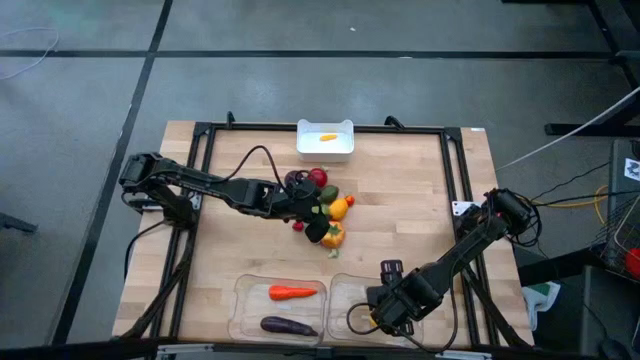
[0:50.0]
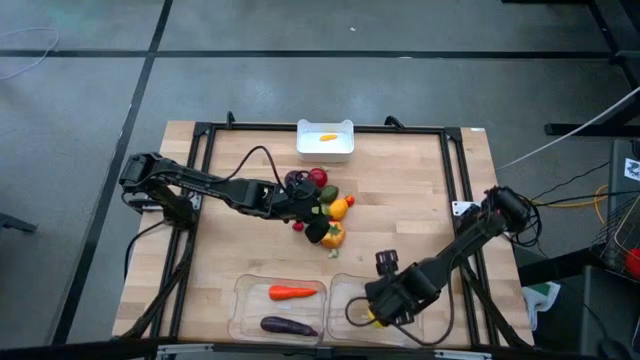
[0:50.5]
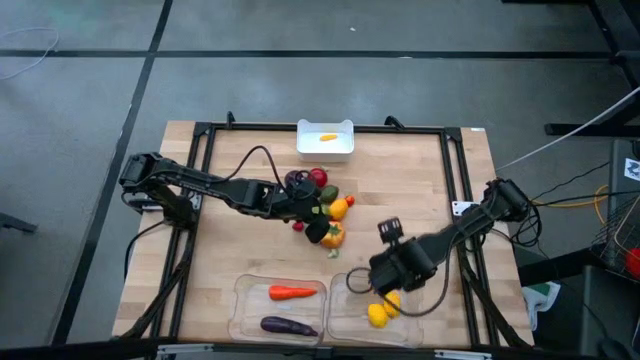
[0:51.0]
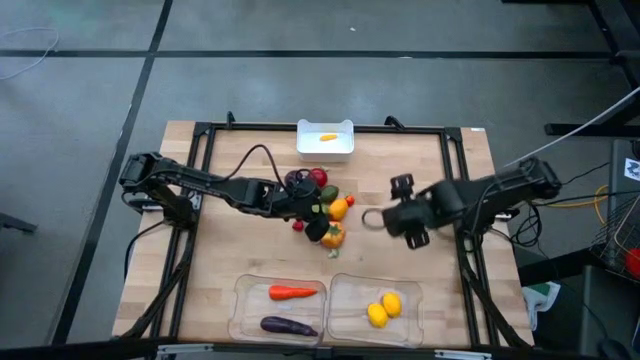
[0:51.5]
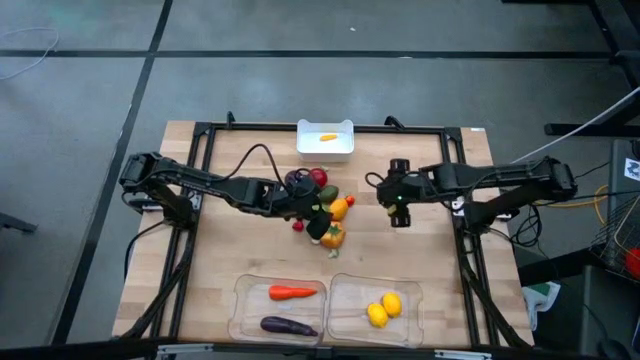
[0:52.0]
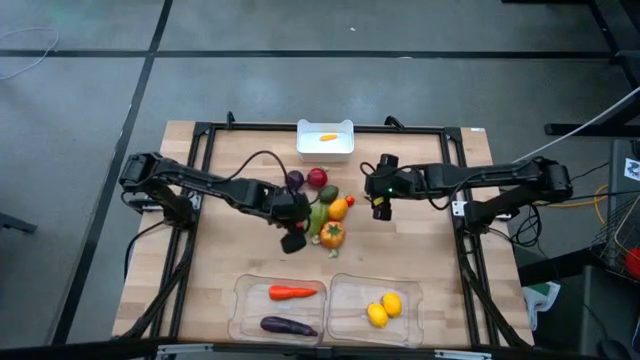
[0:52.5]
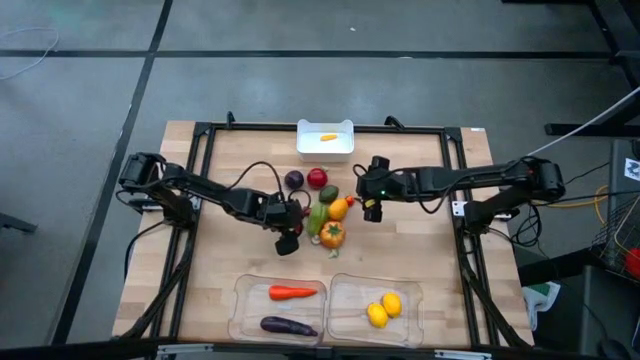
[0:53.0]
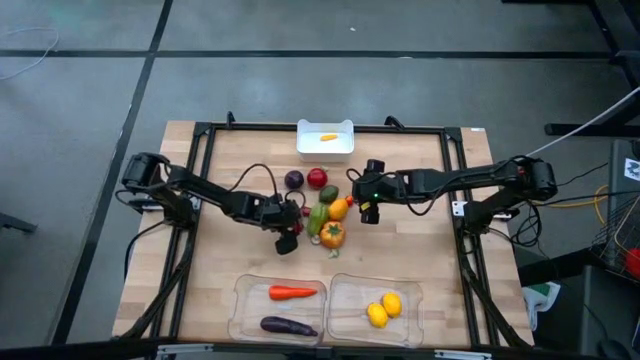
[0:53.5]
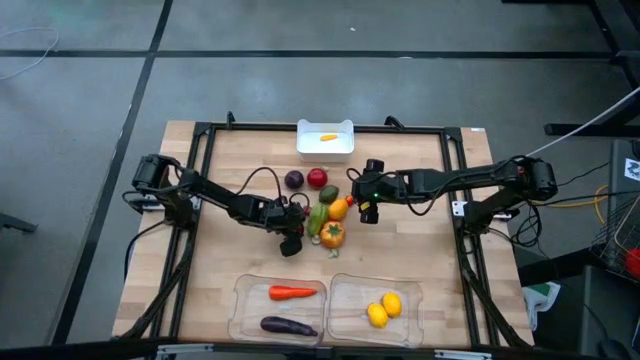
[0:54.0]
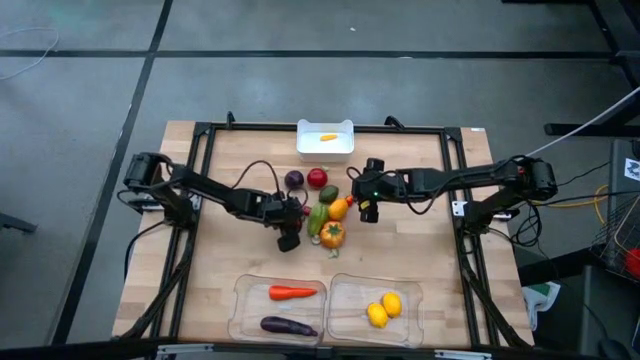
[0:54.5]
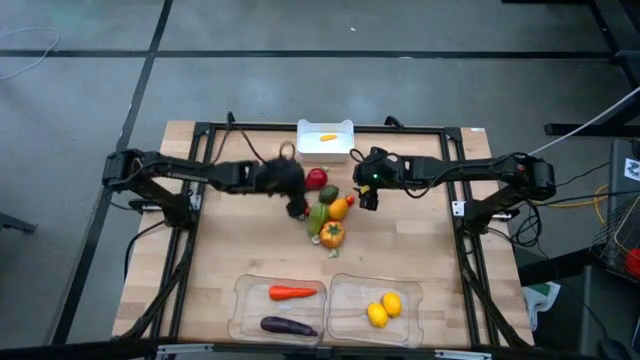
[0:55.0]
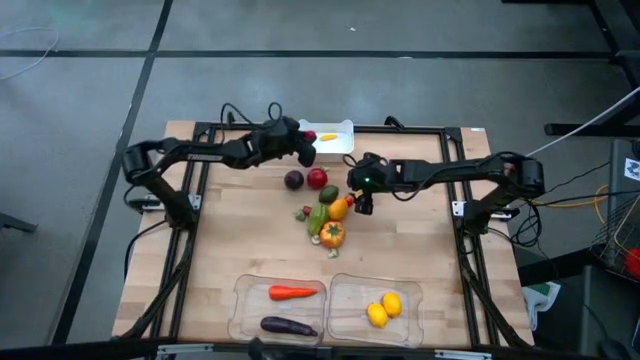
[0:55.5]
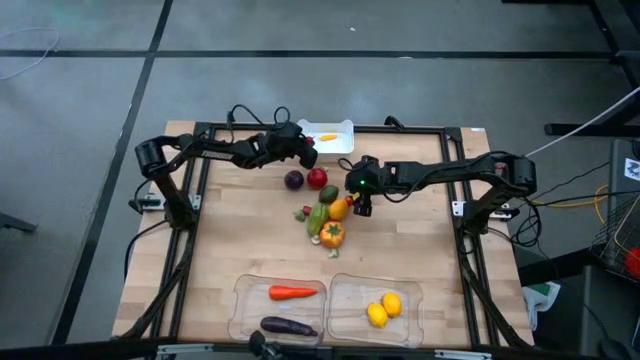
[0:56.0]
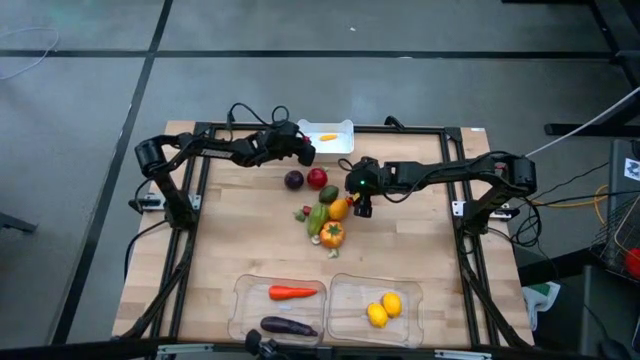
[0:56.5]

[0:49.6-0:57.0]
Task: Sort produce into baskets
Put the bottom red chili pepper into the white bin

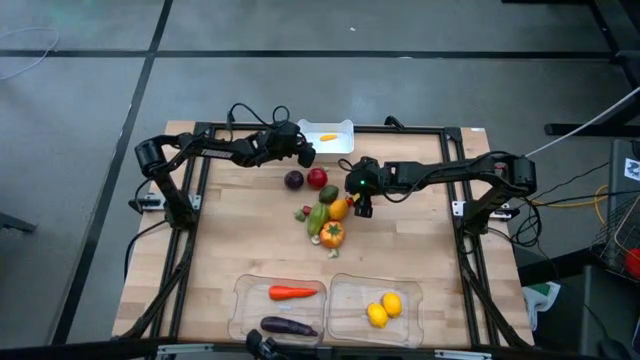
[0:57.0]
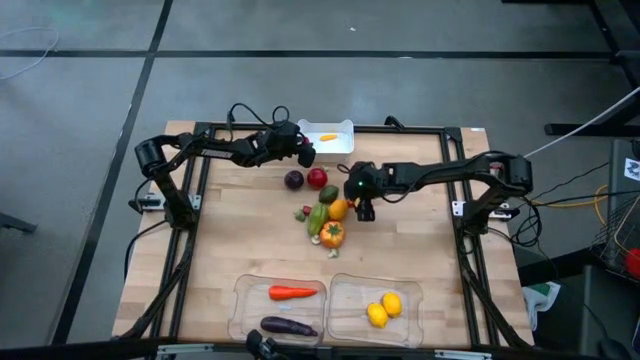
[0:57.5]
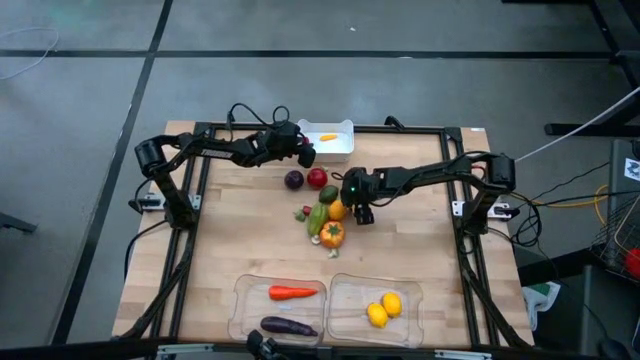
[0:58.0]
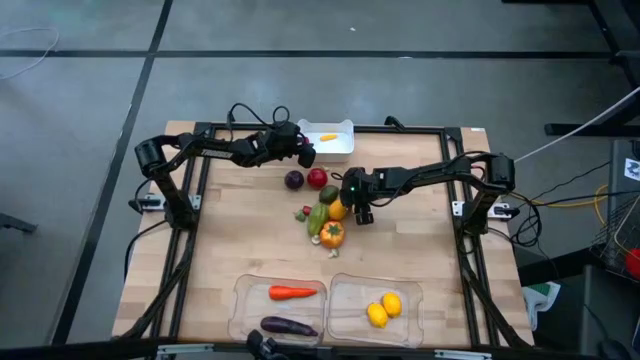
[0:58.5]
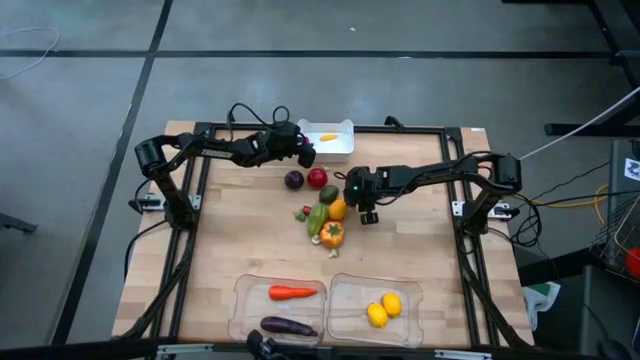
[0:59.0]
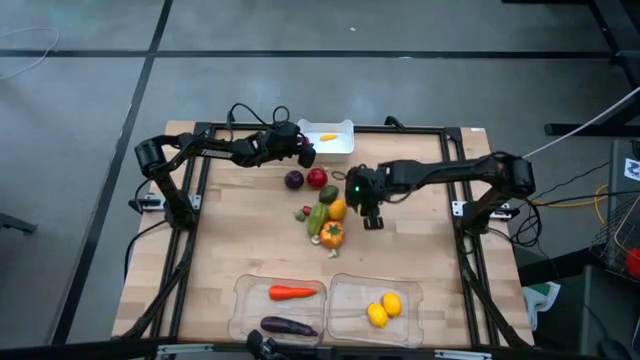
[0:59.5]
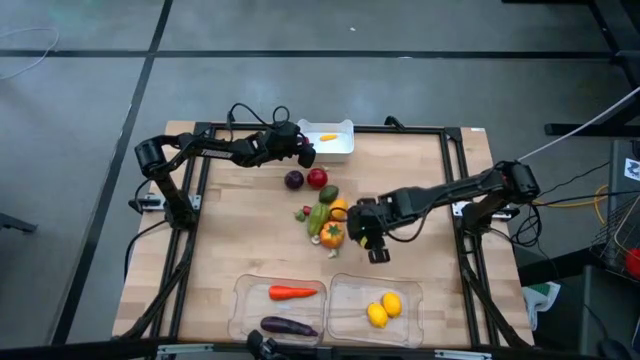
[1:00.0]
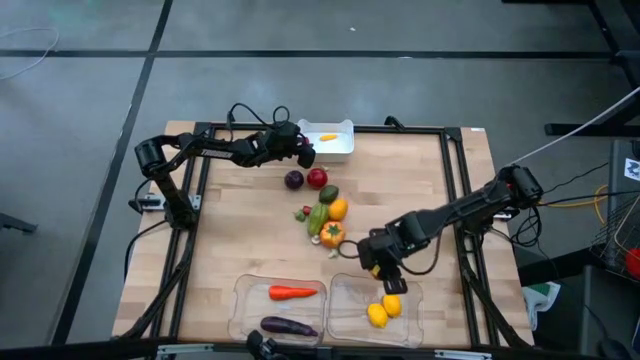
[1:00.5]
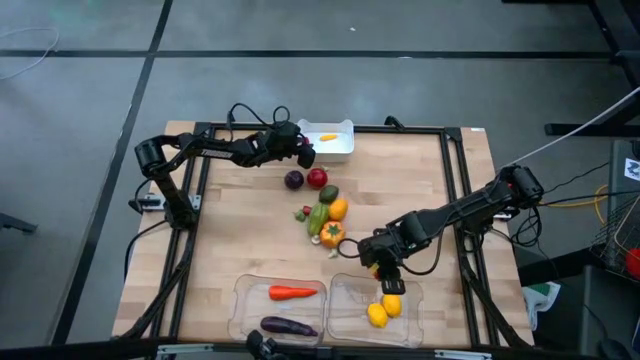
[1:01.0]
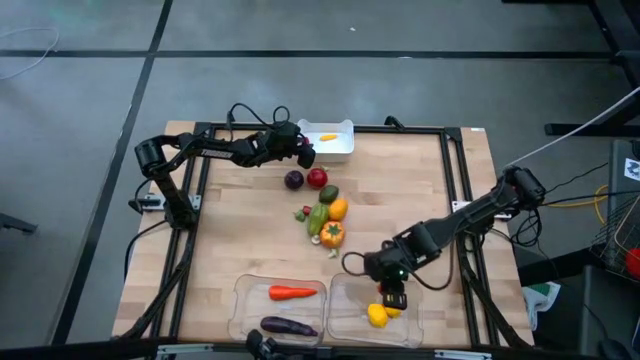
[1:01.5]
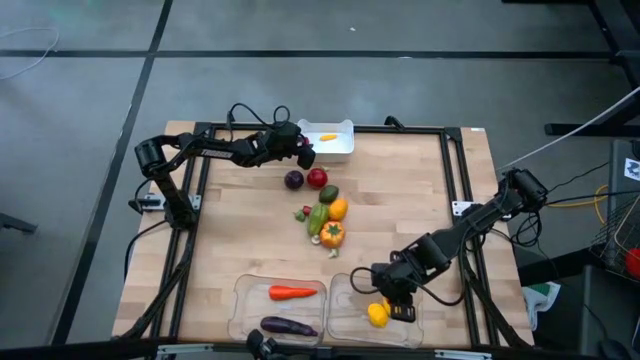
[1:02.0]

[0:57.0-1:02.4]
Put the top orange tomato into the right transparent bin

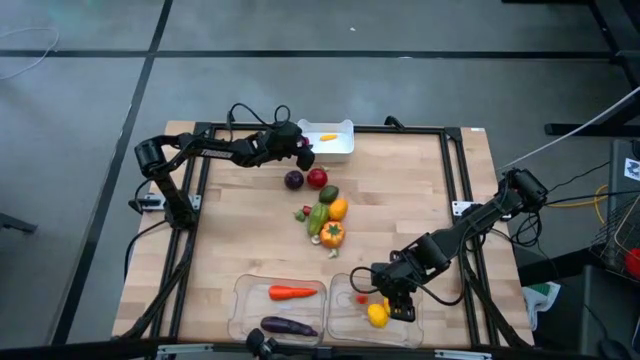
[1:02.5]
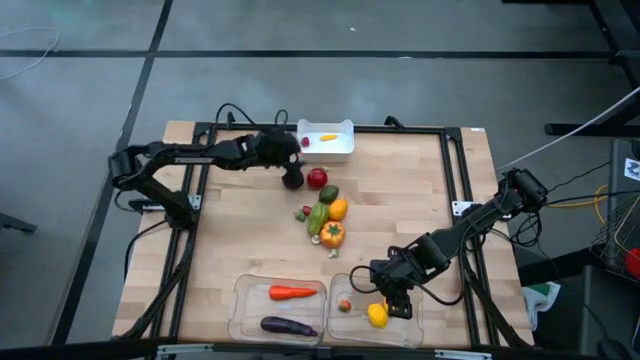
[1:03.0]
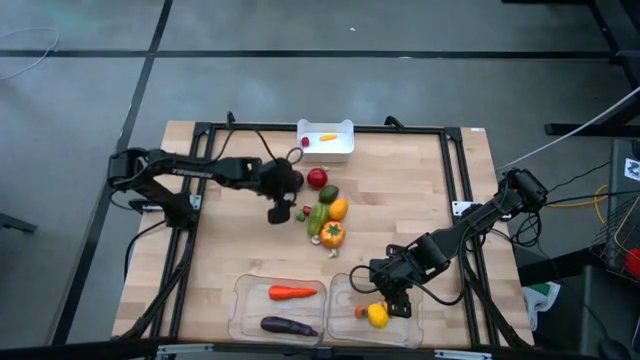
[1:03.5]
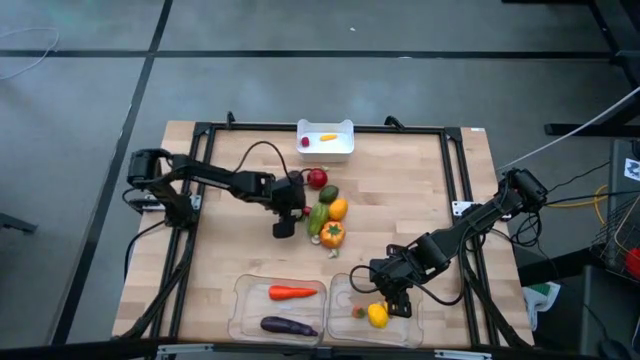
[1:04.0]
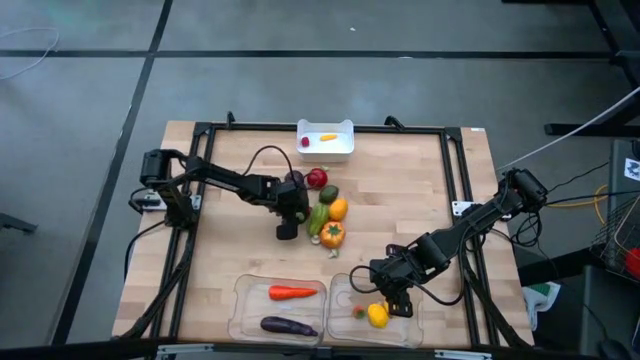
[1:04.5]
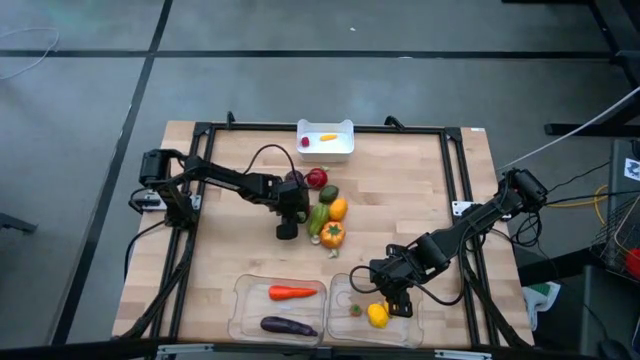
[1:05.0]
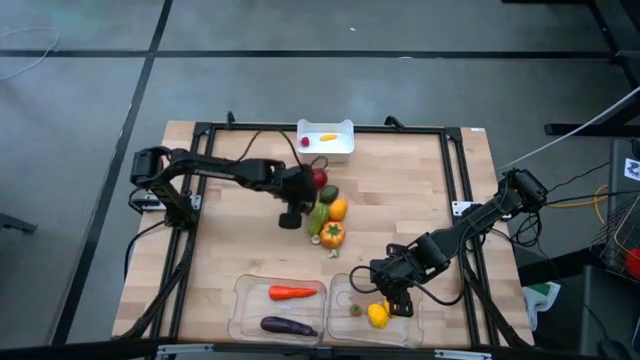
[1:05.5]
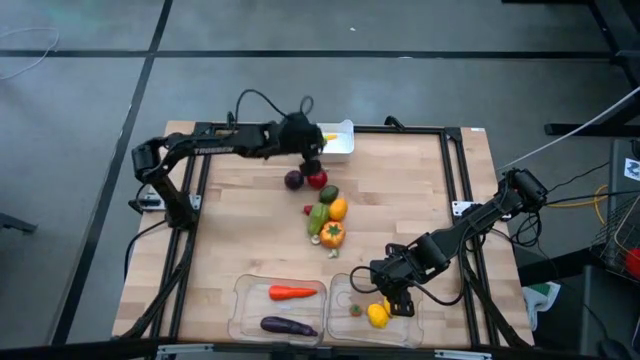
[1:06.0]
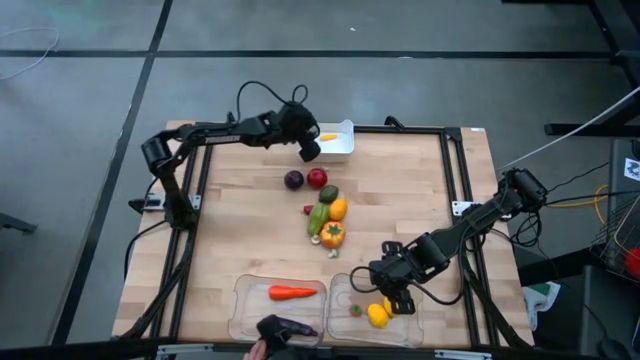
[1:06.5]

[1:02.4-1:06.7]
Put the green chili pepper into the white bin

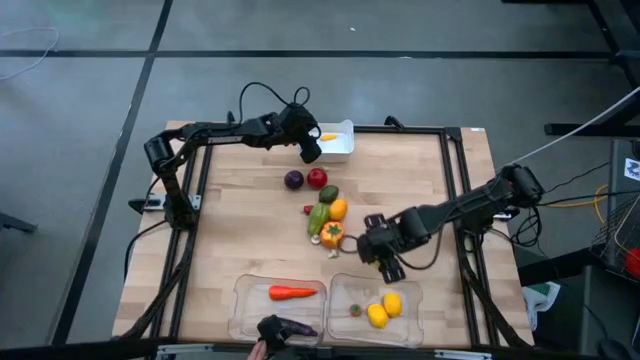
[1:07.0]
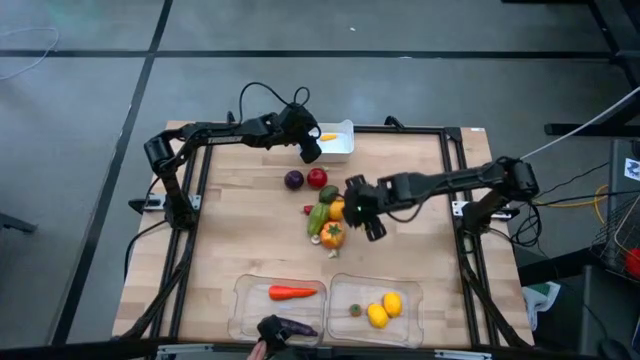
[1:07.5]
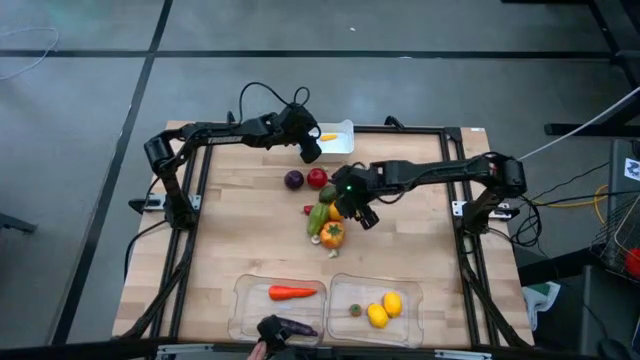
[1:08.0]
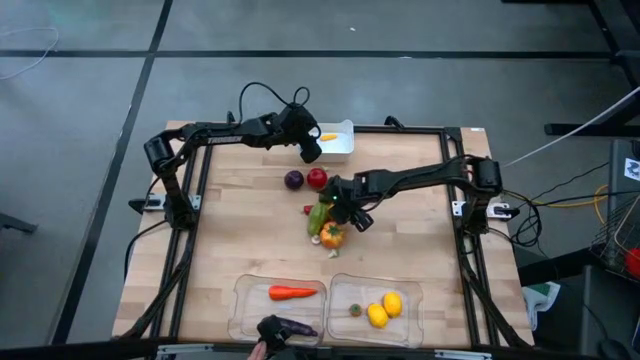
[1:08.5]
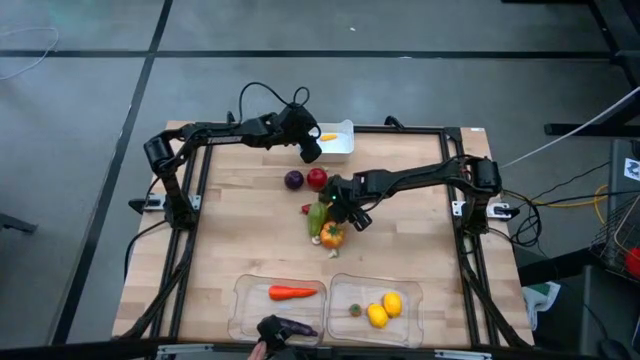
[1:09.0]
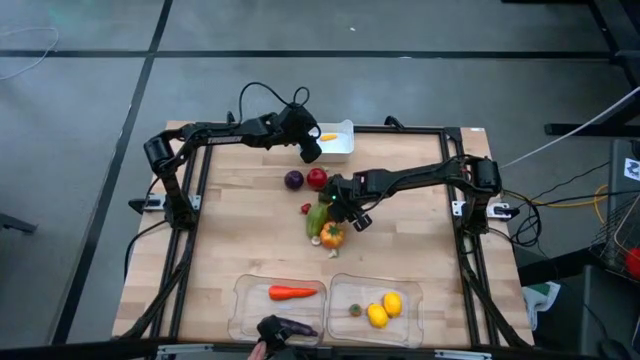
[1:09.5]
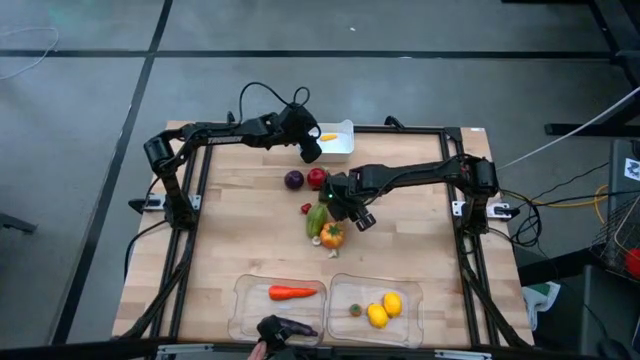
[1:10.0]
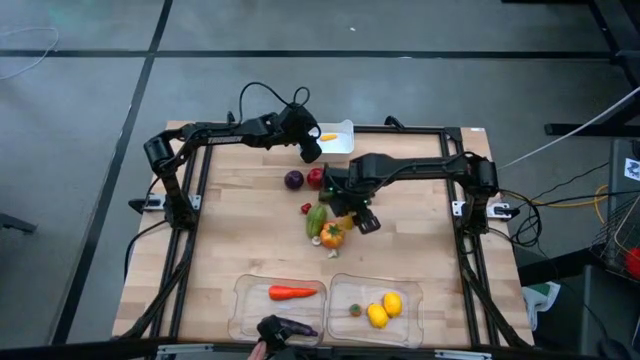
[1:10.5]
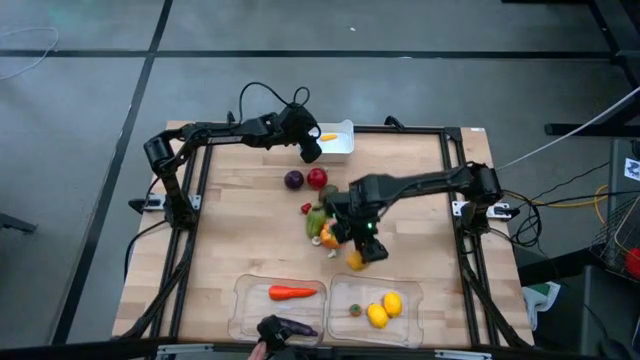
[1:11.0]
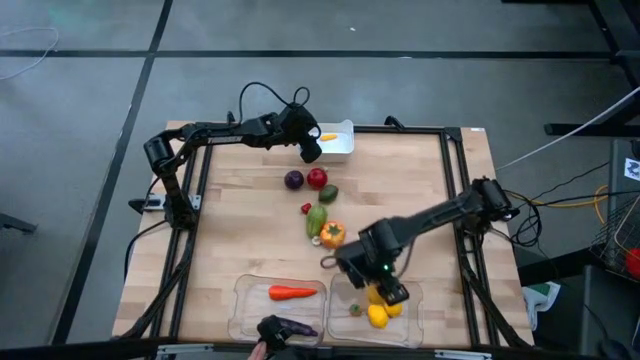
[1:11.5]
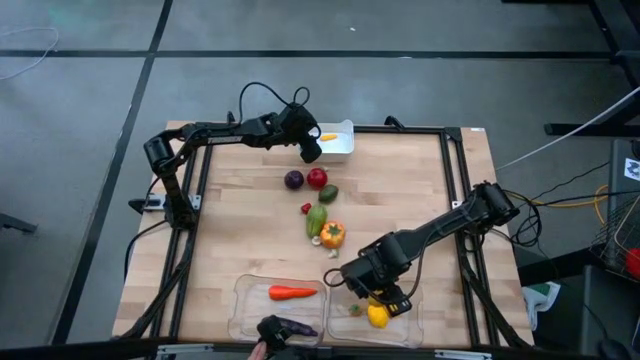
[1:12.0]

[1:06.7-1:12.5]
Put the yellow lemon into the right transparent bin
